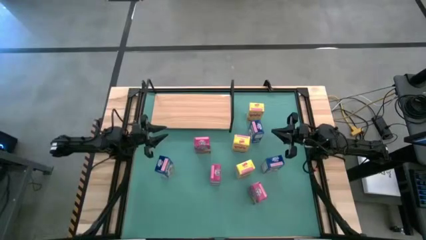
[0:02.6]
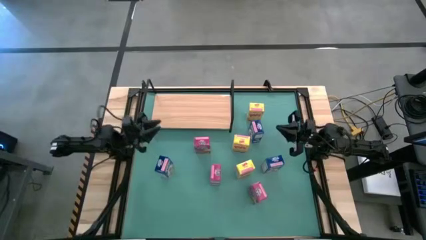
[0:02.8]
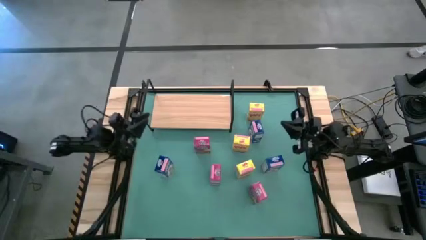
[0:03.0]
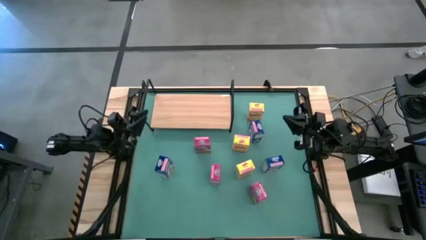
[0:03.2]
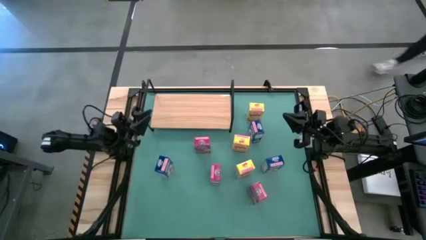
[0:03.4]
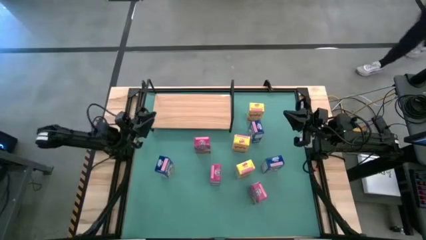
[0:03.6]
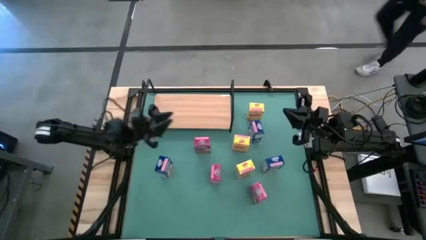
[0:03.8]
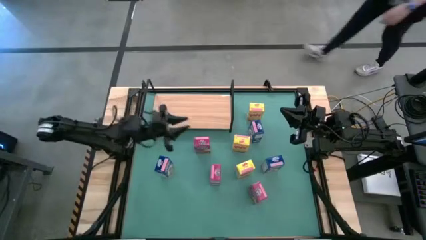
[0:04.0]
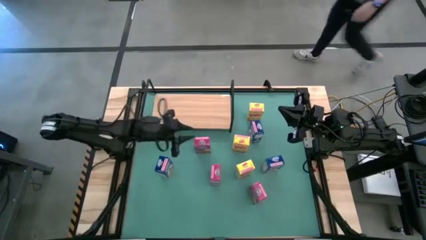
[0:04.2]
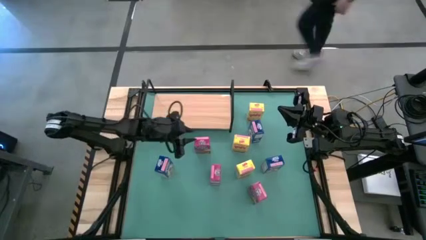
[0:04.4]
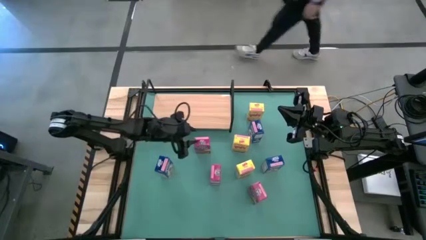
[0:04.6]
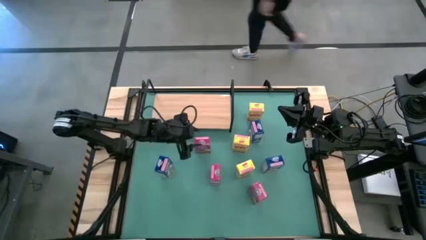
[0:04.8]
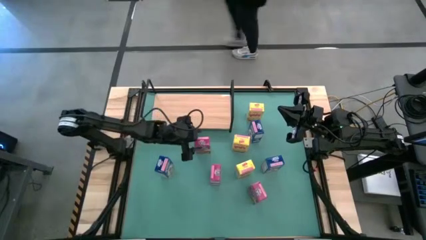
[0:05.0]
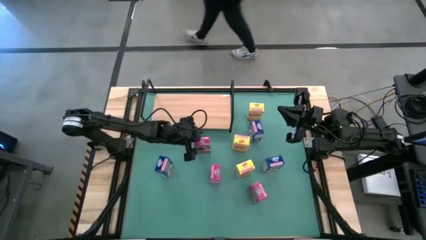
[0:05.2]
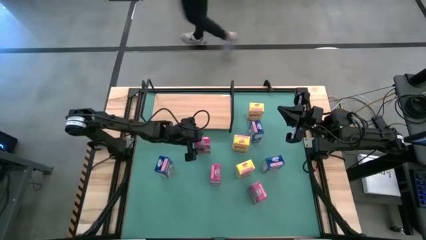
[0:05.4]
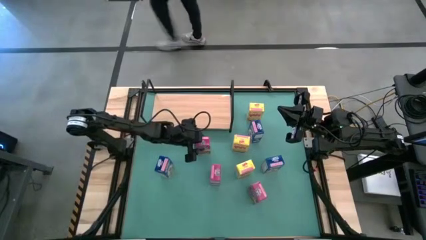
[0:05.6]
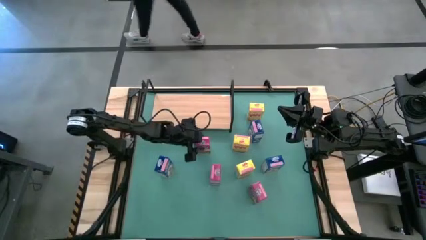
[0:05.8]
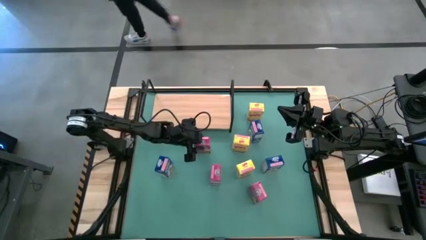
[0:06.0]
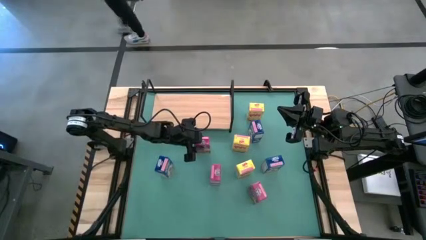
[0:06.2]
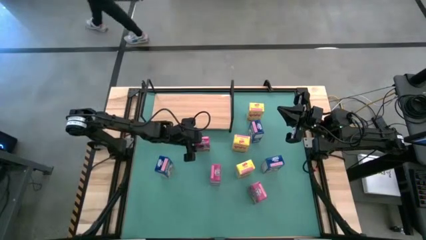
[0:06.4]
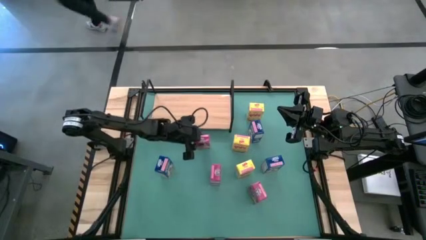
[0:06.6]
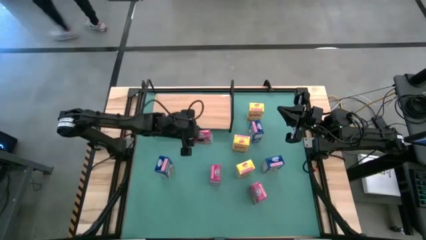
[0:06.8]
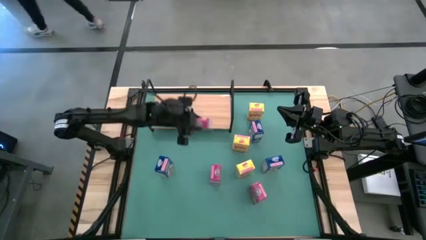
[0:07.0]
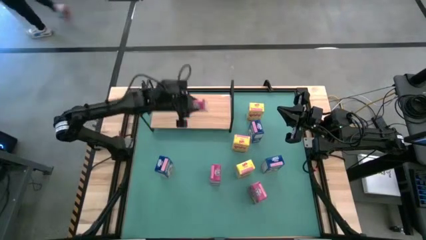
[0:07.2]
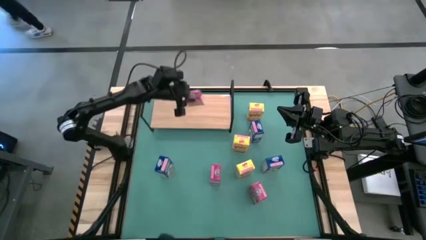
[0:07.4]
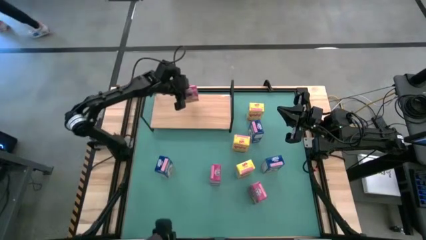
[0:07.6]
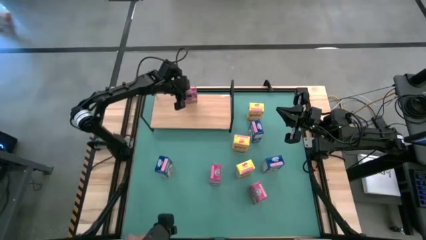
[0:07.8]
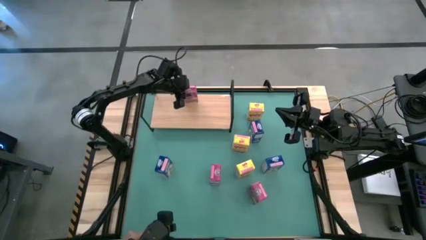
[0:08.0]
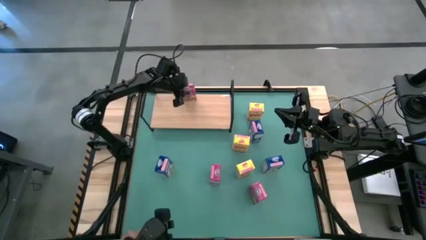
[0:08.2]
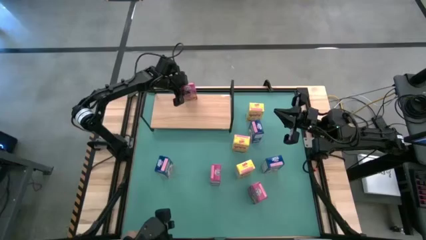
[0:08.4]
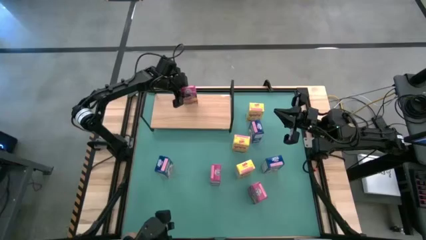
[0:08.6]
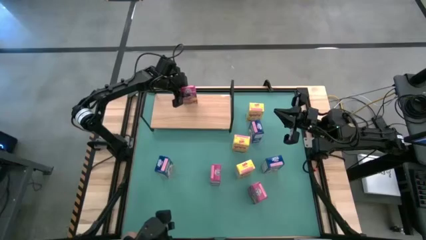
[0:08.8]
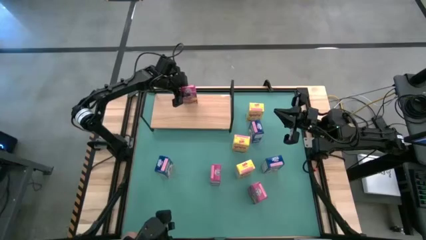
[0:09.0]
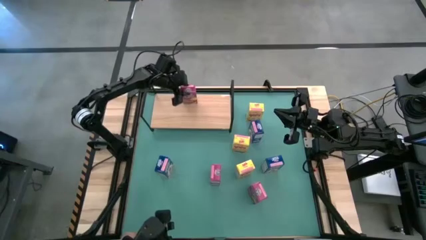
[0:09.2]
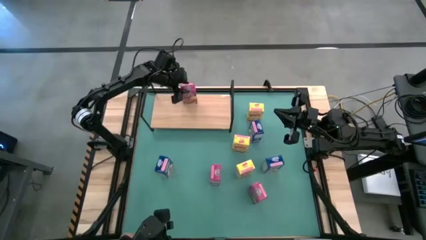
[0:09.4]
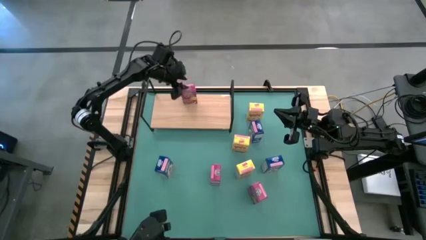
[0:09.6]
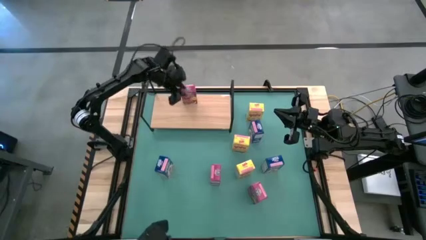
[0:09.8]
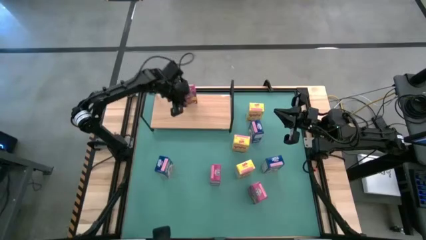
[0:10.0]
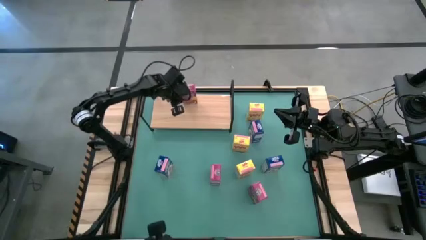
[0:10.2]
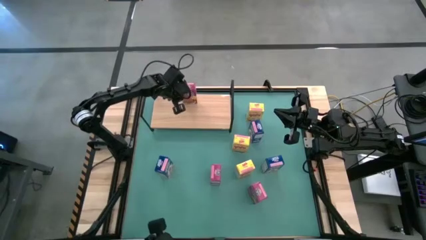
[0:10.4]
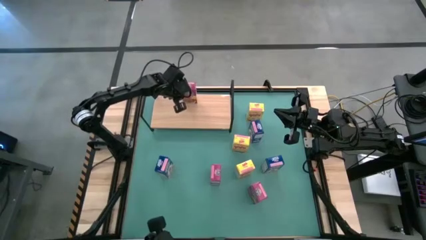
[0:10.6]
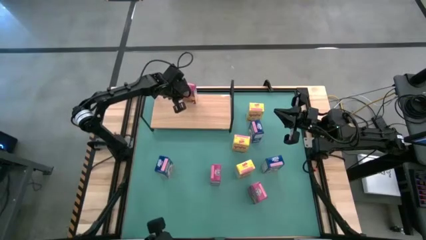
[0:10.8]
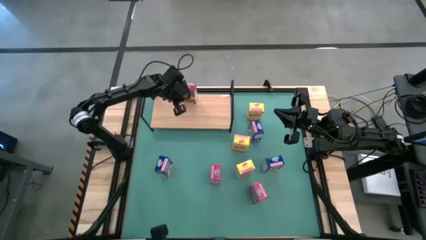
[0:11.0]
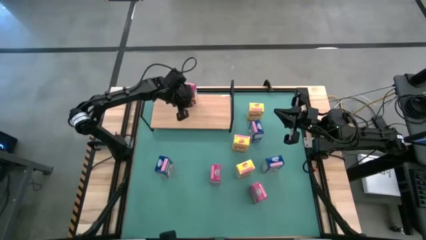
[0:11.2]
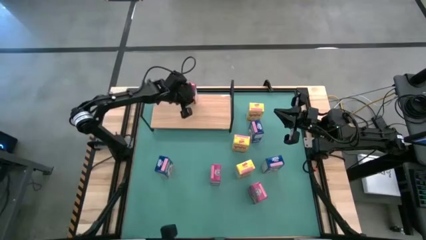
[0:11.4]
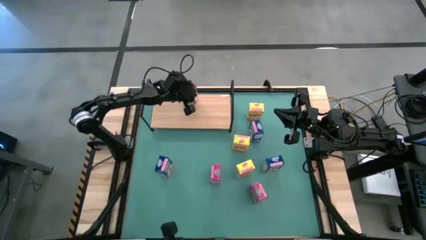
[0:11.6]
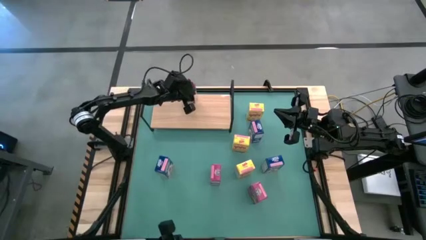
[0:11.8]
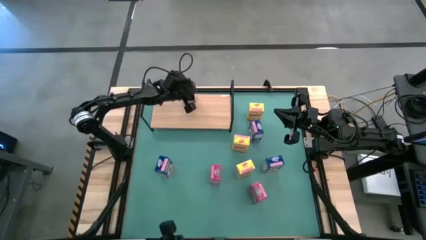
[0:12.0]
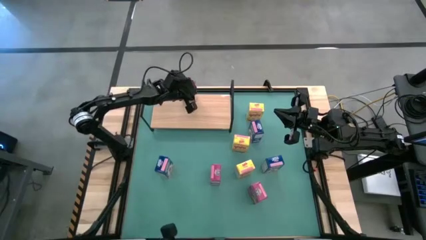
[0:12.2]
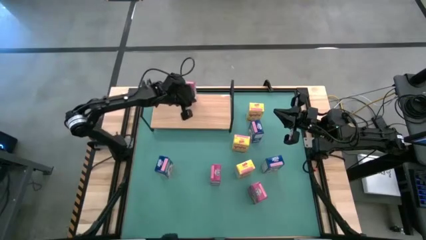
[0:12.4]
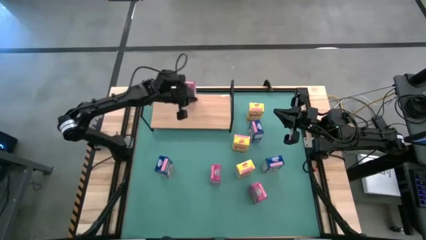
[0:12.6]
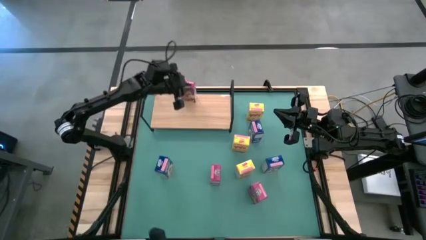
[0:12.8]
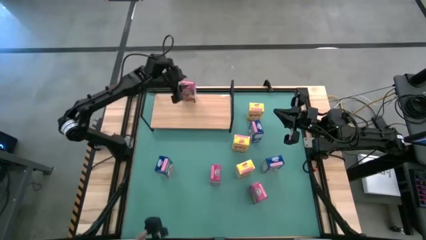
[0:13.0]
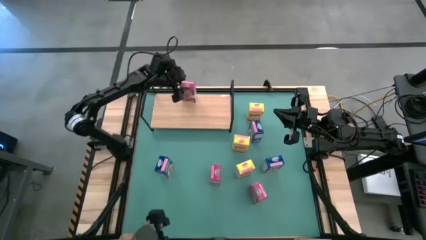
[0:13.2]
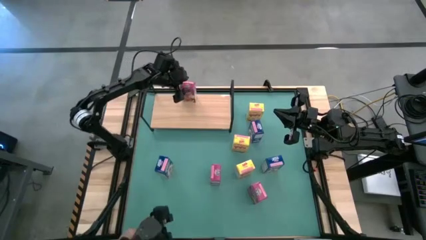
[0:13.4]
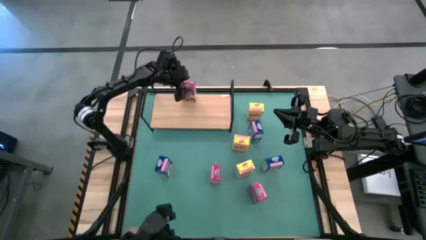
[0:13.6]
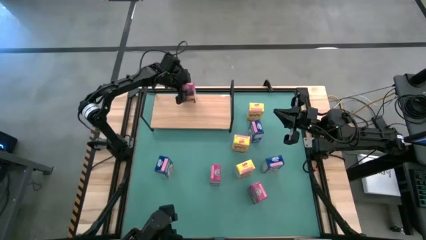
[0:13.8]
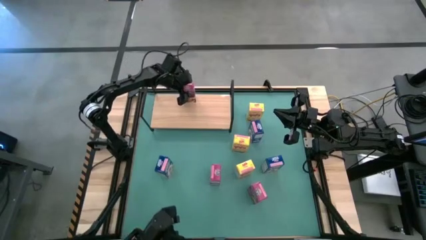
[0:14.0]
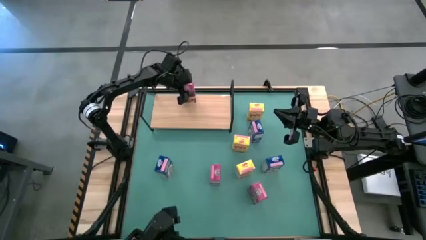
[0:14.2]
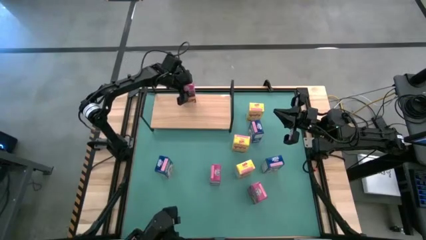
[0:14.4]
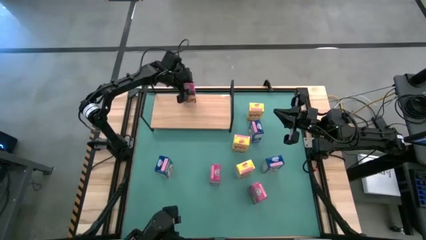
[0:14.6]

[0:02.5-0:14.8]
Task: Stack cereal on shelf
Put the top pink cereal box on the shelf
